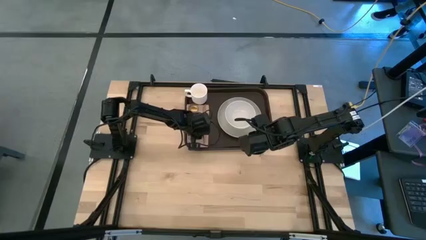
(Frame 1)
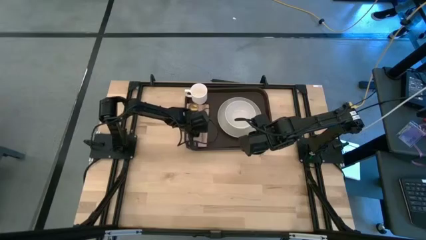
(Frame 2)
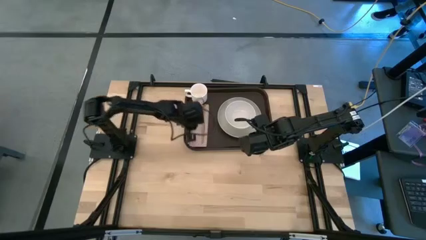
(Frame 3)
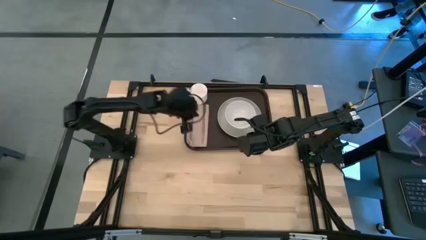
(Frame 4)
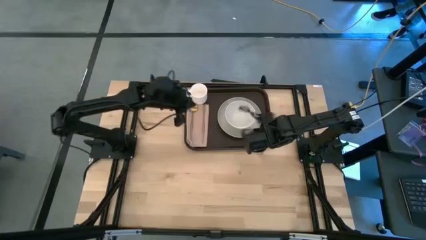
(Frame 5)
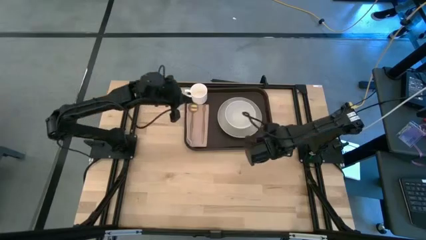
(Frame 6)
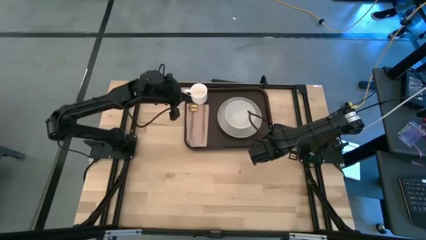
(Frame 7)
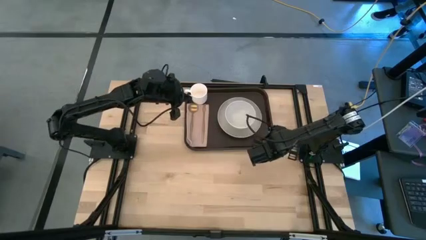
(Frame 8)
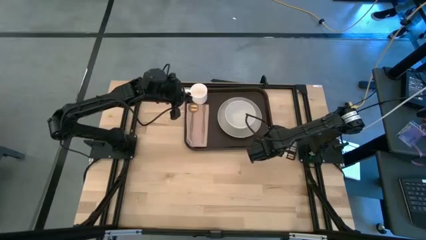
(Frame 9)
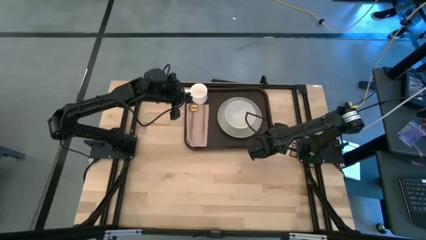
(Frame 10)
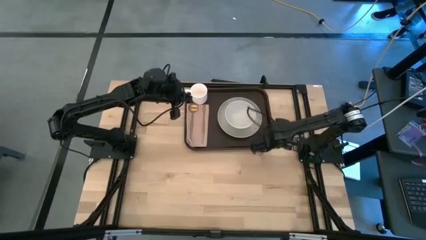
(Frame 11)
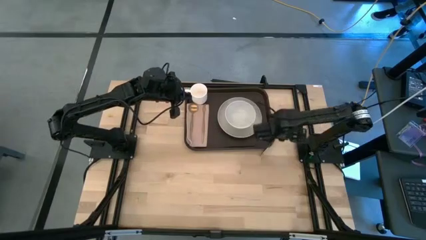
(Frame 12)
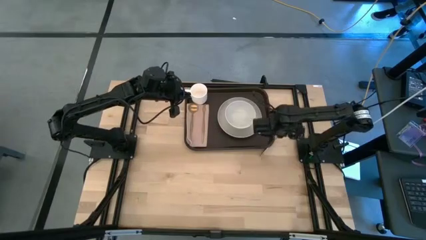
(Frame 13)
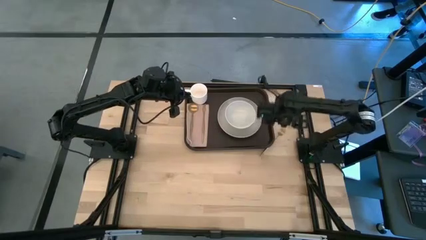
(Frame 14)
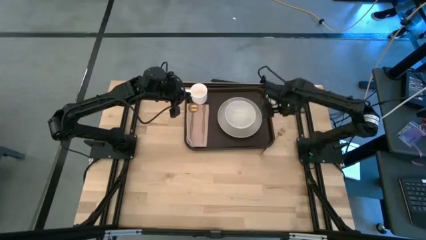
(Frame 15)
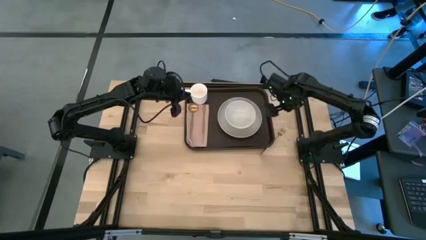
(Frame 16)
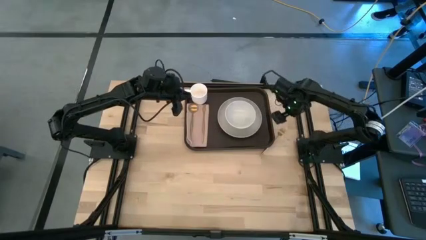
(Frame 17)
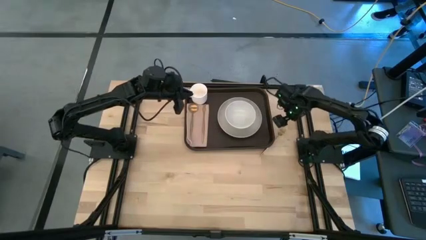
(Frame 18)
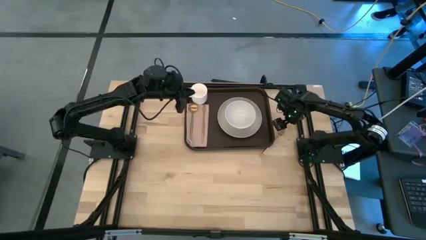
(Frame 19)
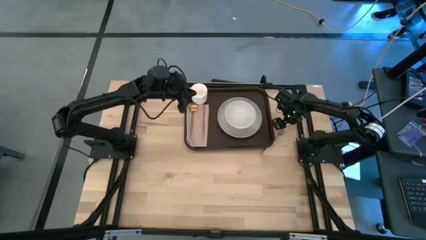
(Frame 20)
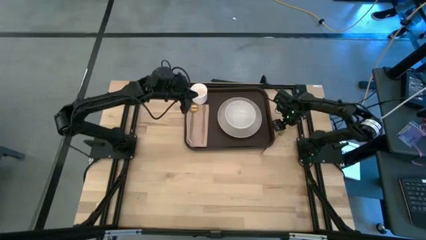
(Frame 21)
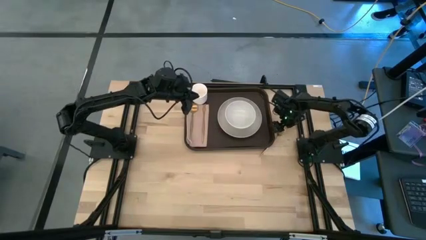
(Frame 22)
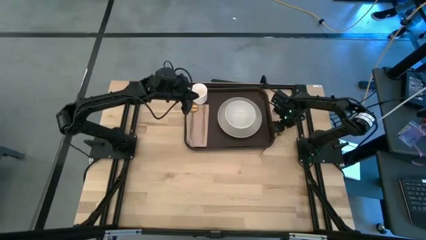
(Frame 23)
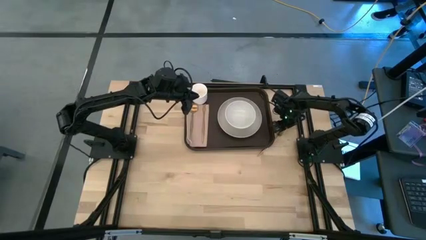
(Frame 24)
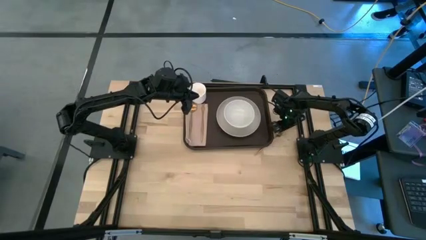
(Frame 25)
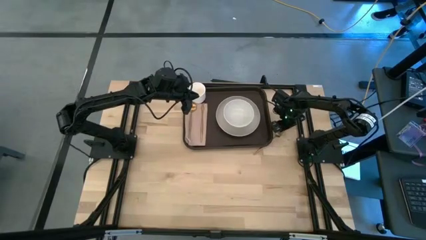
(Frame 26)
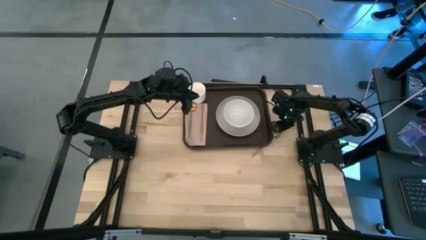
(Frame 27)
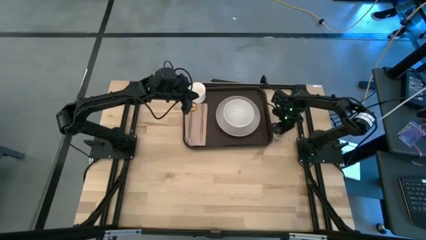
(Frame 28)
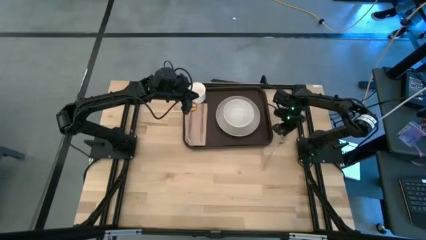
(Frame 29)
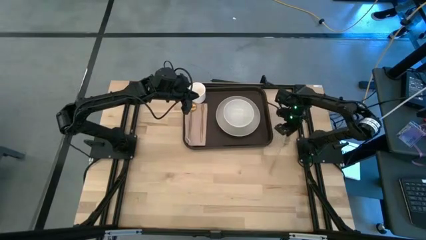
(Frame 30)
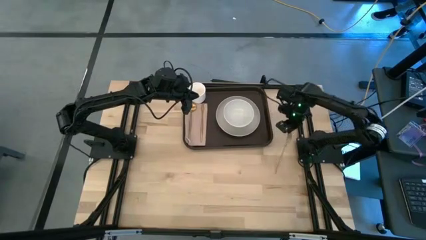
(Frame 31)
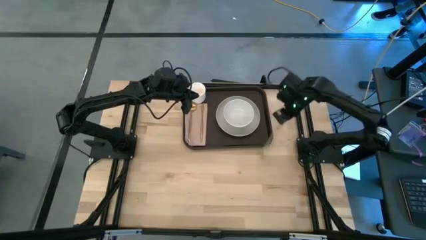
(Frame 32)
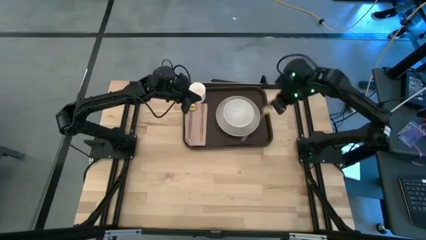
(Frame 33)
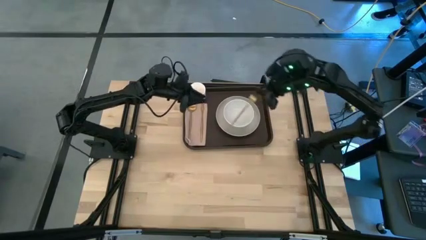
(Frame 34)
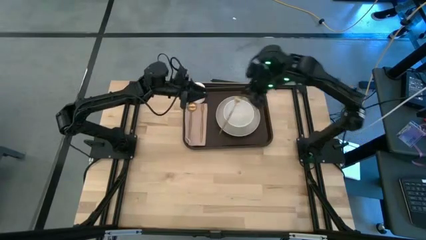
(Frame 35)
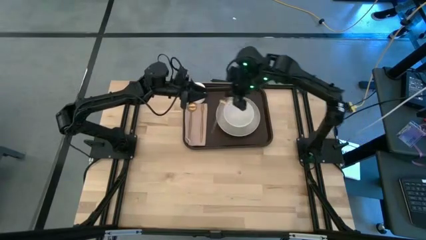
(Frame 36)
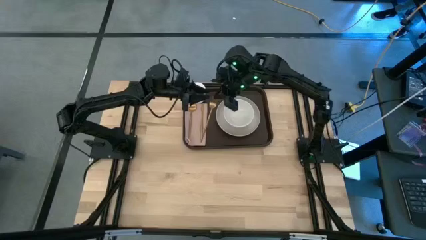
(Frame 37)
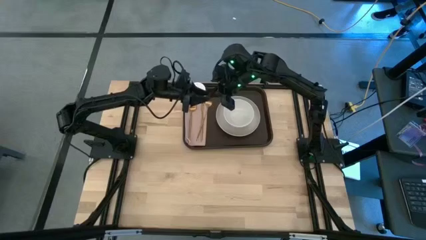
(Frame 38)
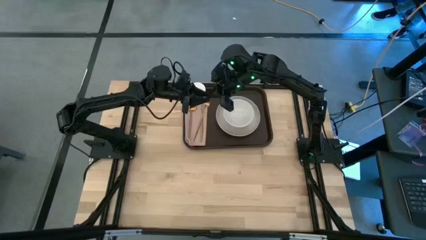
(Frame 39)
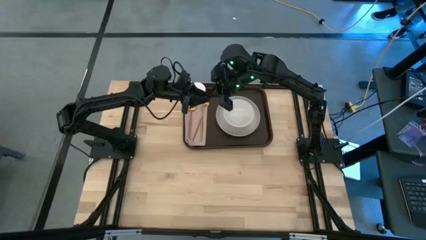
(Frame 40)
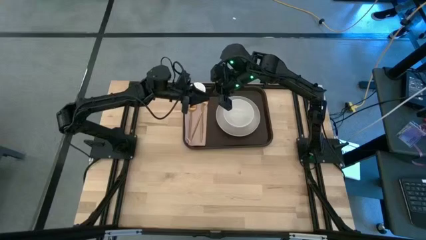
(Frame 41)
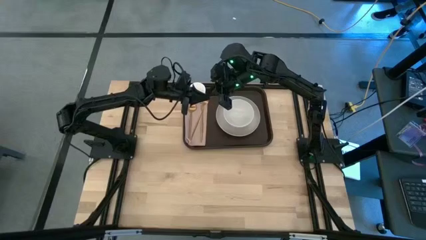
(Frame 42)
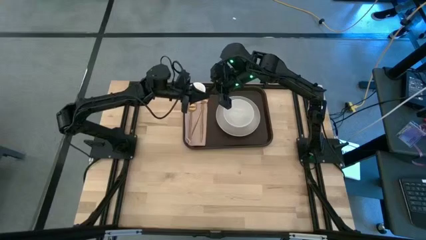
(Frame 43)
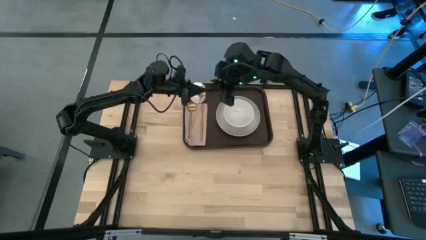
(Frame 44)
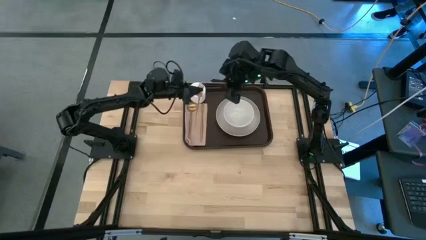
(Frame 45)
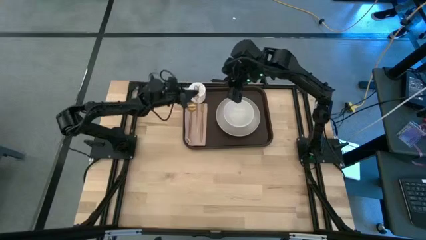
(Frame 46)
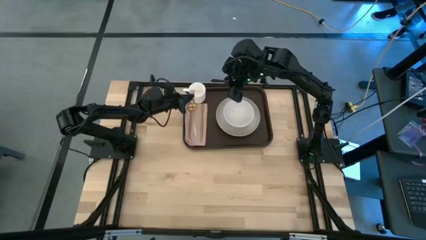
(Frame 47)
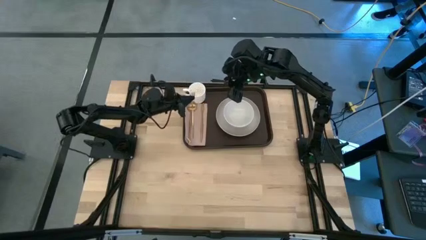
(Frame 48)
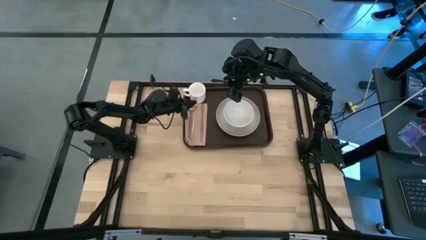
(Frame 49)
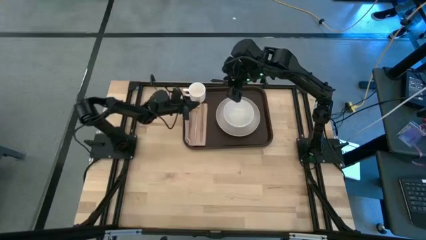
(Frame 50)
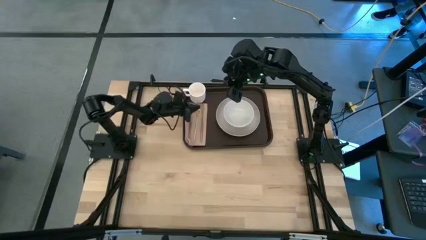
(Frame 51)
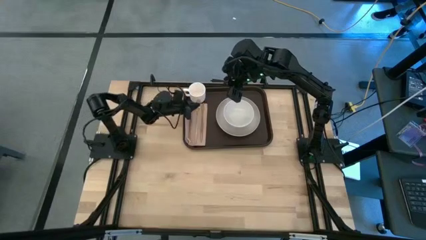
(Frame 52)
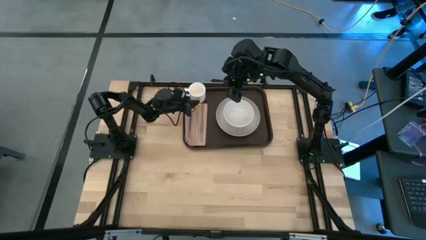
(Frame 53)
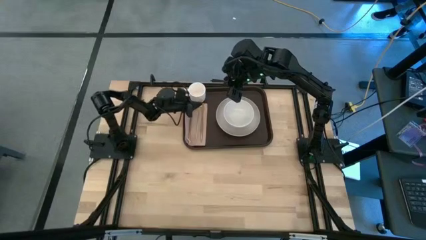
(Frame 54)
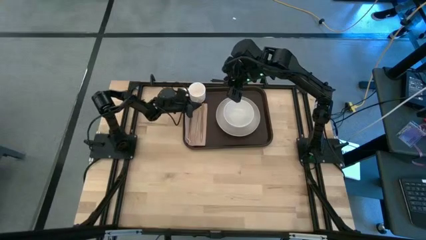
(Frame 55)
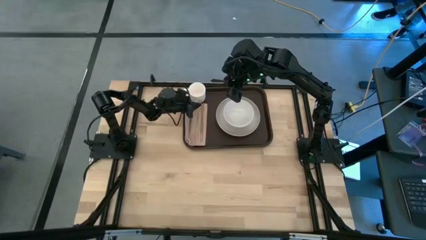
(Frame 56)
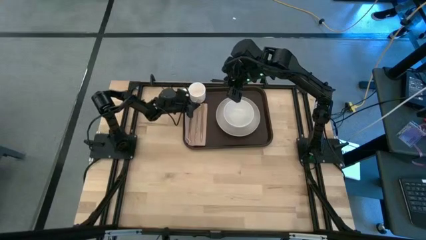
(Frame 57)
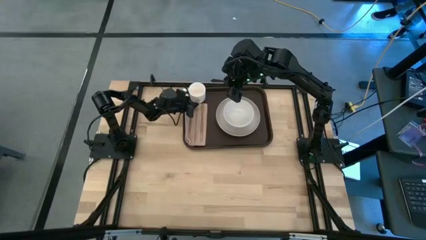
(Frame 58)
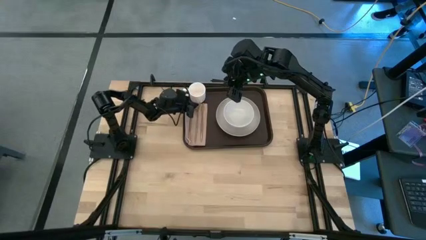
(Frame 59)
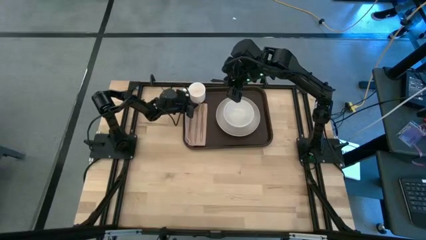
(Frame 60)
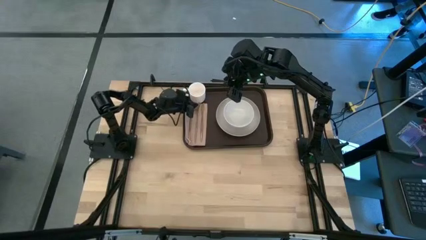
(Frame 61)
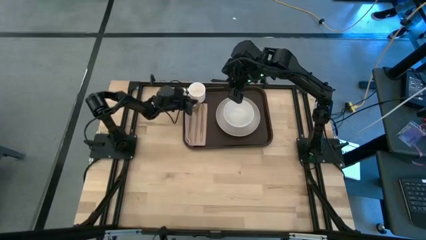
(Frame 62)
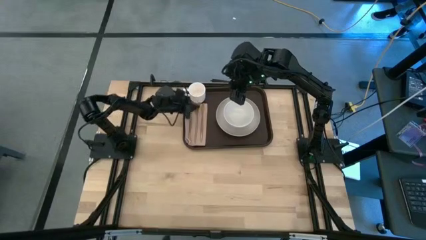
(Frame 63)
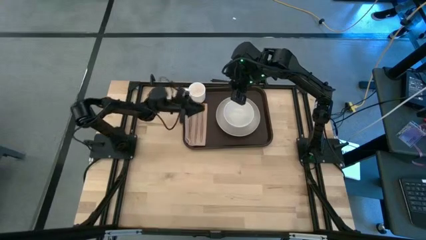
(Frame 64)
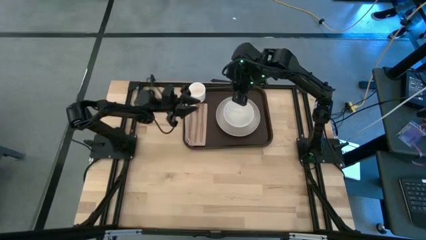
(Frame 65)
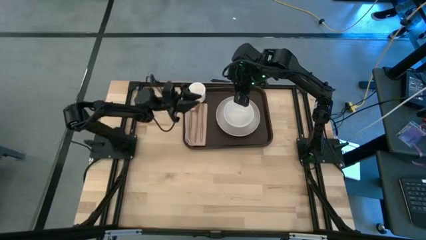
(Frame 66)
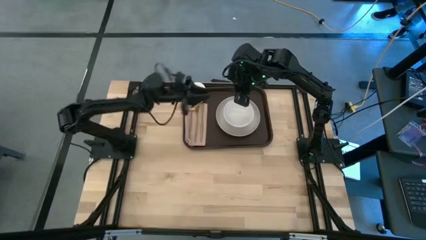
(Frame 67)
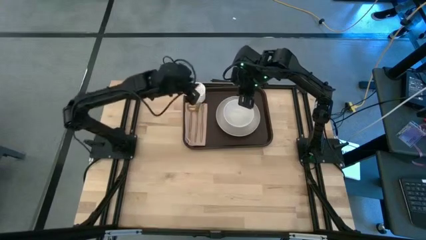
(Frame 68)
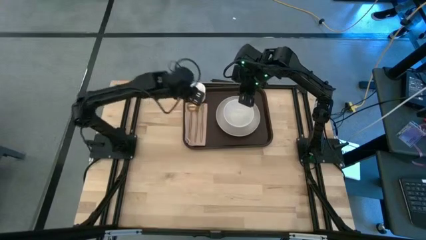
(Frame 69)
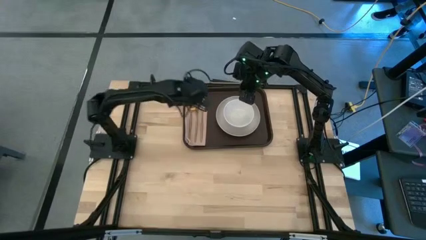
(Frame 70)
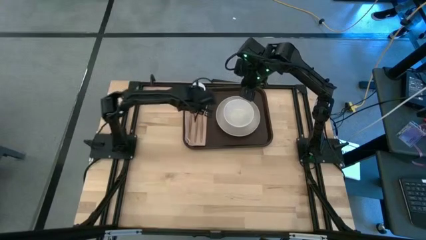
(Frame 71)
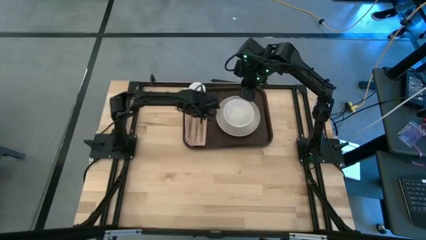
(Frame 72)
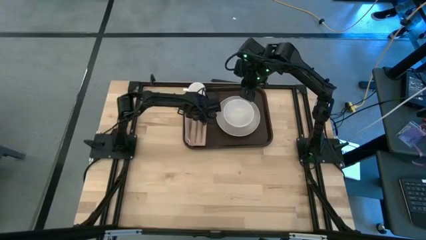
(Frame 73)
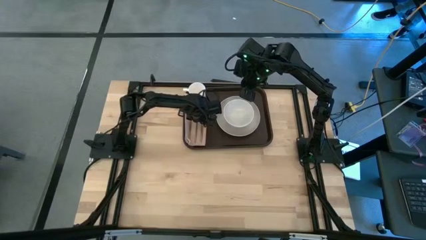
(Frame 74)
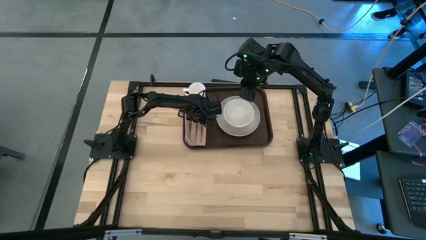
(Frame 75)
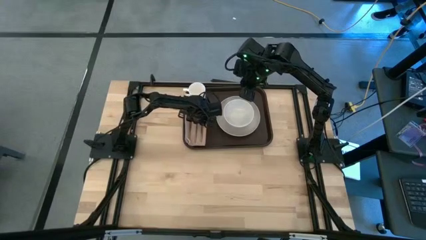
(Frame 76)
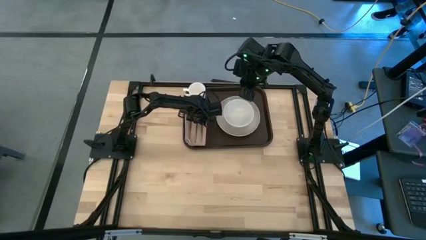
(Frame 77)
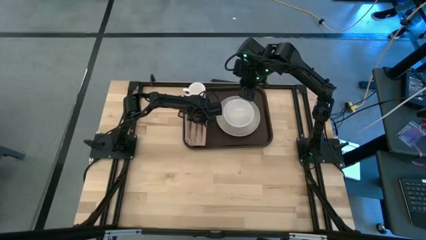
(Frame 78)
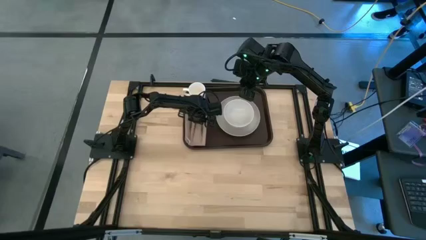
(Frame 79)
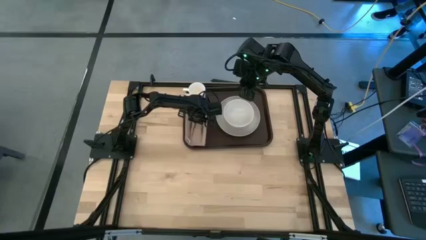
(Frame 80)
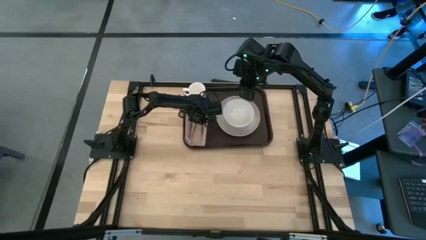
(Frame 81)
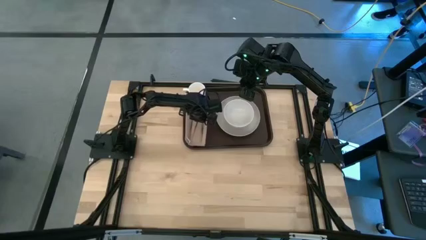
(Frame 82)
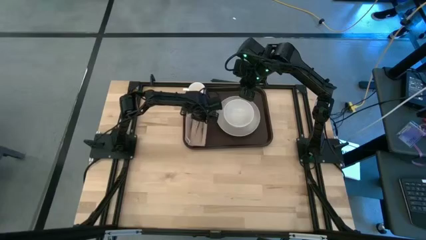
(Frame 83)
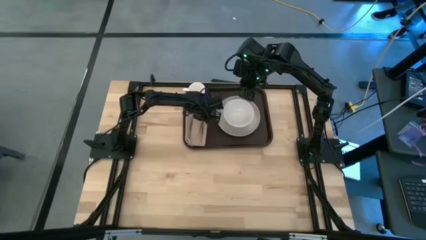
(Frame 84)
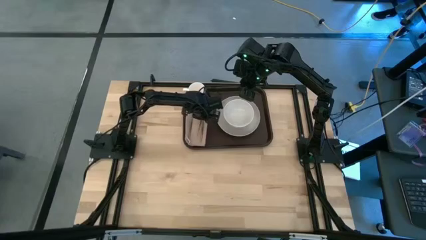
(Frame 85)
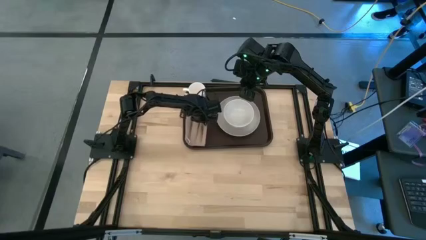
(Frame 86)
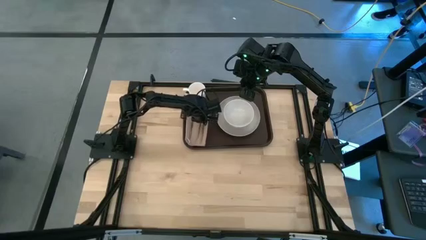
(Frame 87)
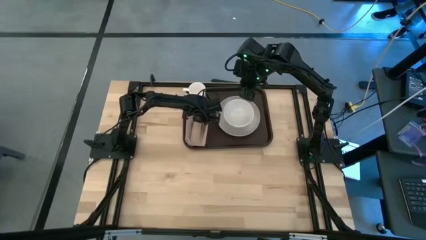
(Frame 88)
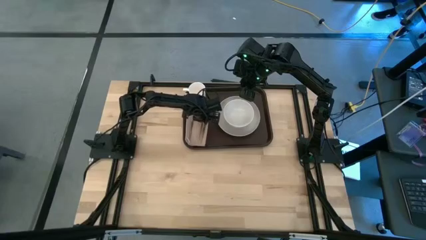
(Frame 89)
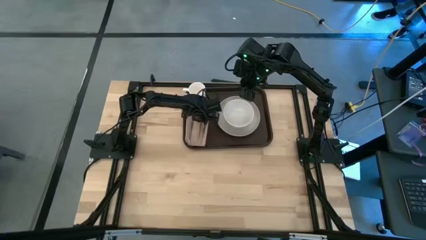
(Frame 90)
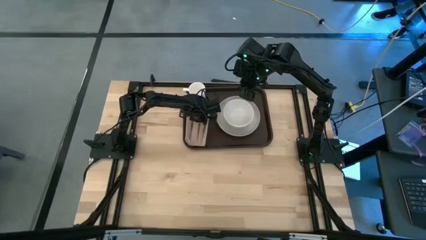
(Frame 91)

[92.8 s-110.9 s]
Task: Set up tray
Put the gold fork on the light brown napkin to the right of the gold spoon
